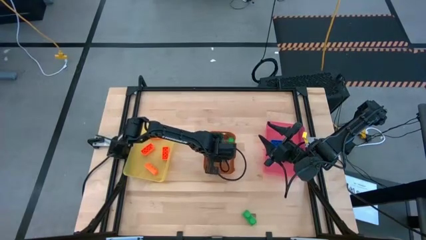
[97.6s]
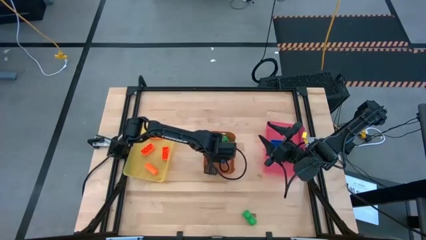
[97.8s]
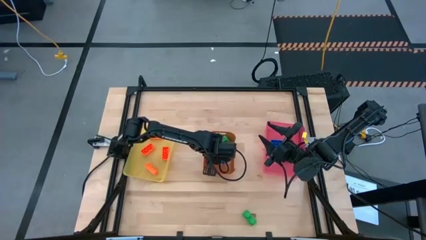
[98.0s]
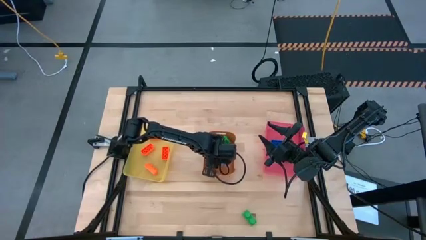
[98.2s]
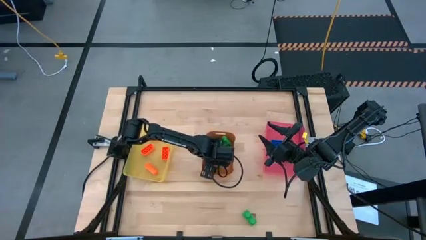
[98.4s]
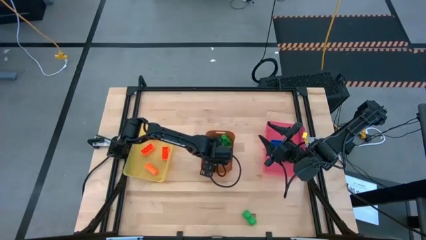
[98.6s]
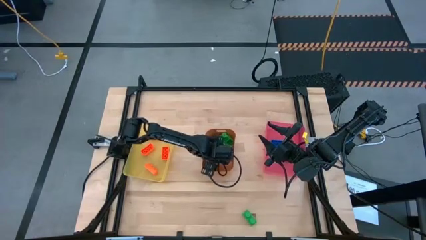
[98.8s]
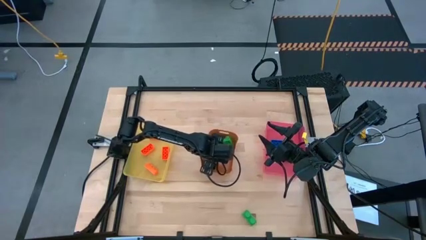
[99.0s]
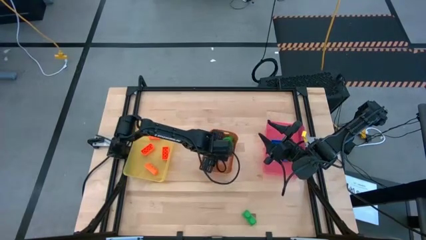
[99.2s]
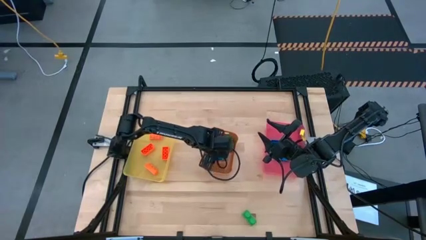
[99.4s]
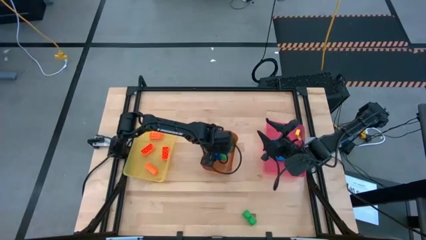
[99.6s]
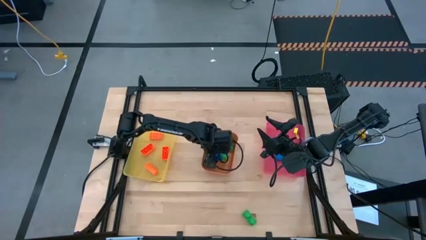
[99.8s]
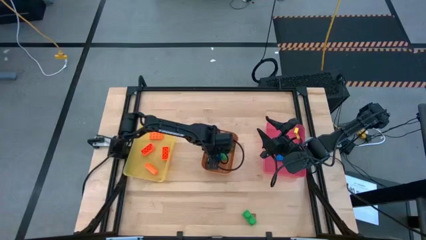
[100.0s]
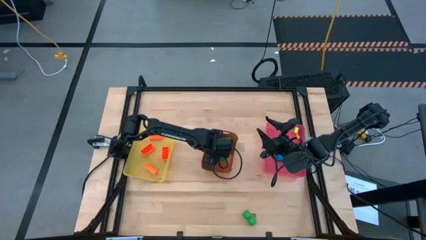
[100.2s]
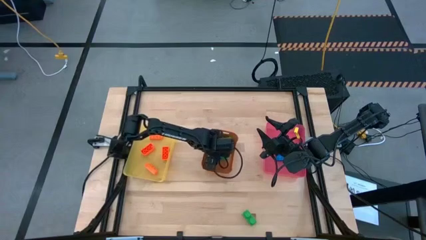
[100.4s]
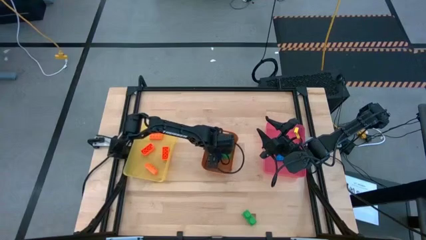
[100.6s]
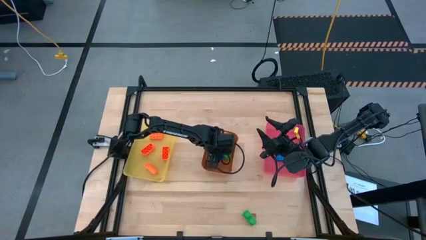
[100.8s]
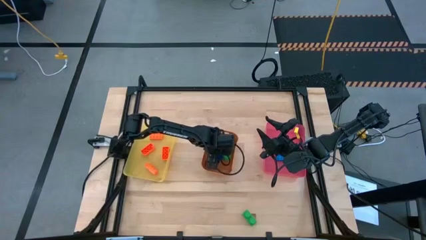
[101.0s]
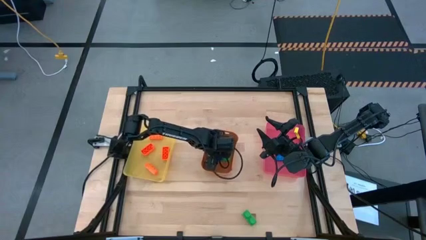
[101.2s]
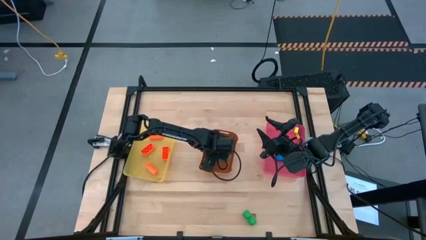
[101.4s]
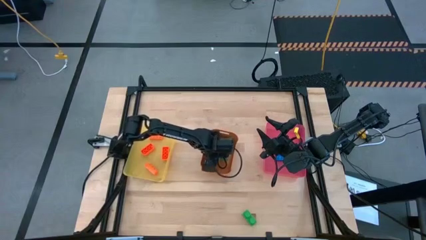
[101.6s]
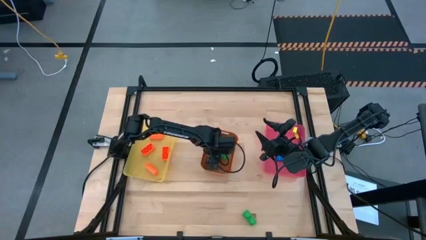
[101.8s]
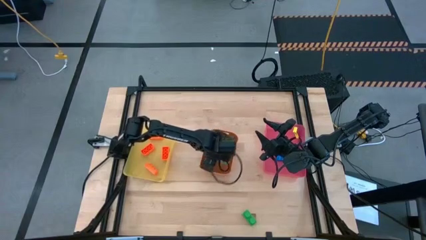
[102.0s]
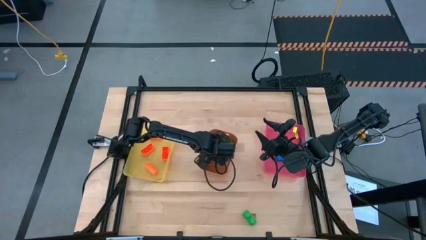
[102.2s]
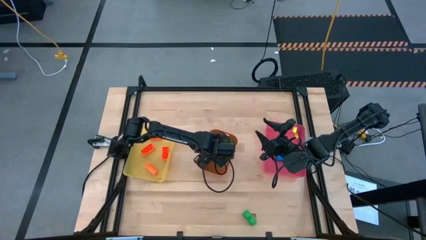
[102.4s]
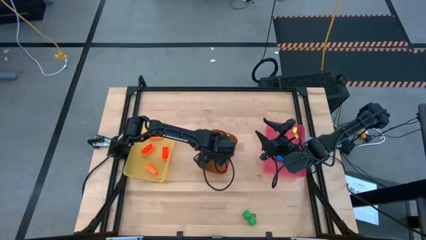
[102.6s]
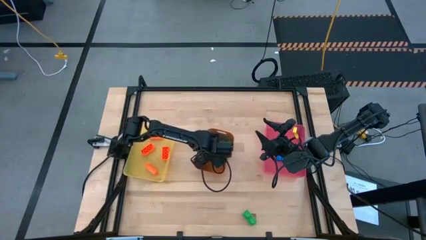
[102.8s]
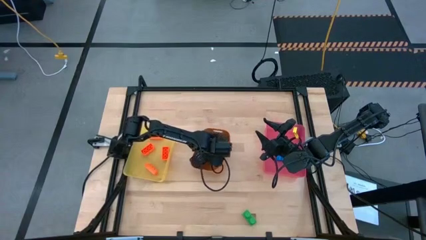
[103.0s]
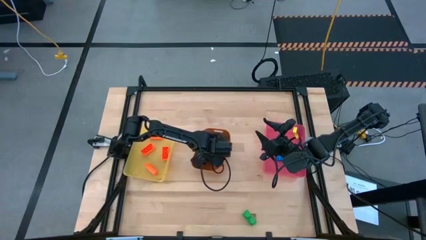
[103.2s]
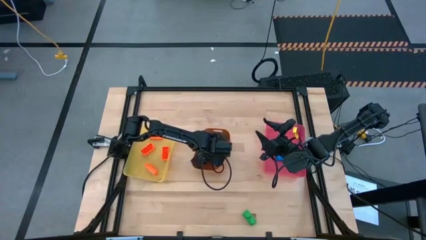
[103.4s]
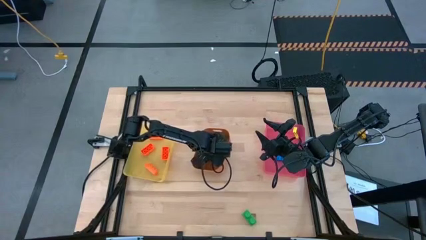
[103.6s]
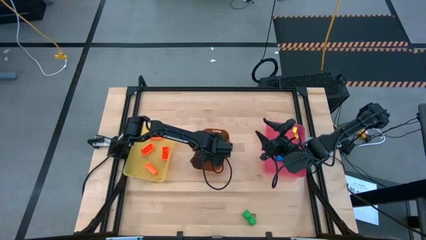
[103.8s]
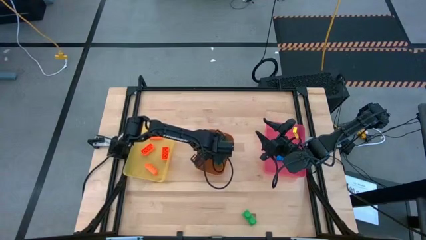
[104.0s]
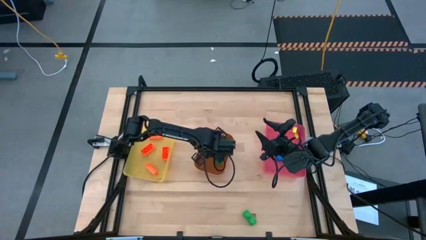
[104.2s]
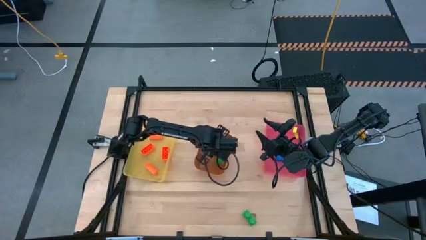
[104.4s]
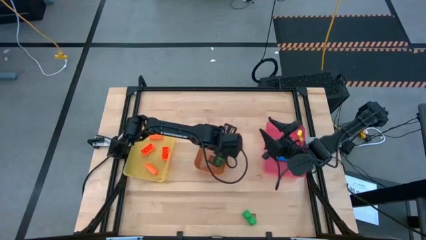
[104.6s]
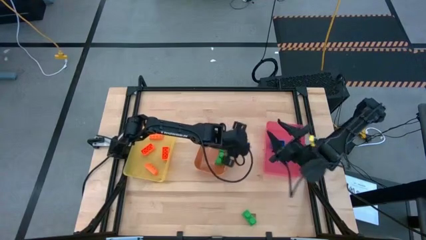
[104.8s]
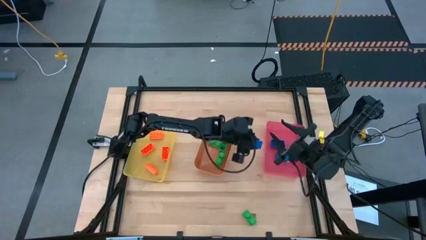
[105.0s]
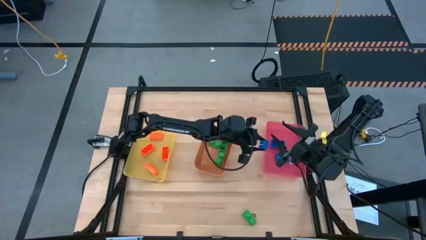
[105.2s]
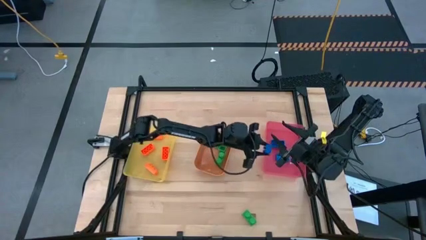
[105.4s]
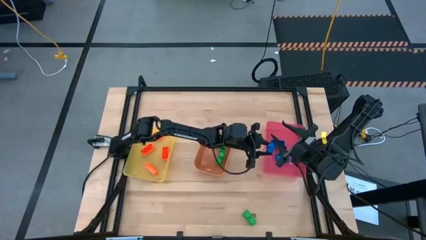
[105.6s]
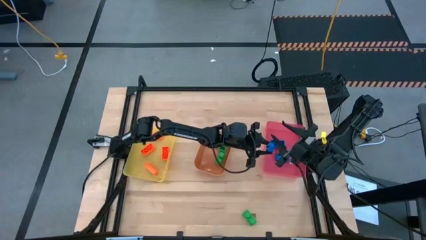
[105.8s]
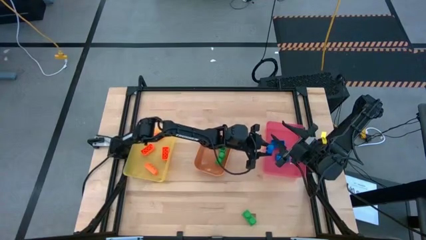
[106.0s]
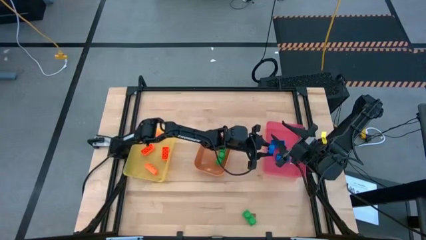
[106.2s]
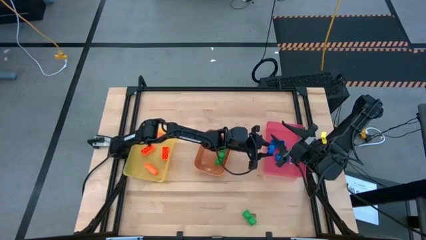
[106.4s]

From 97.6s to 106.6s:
Task: Sort & place blocks by color
Put he blue game piece into the pink bin

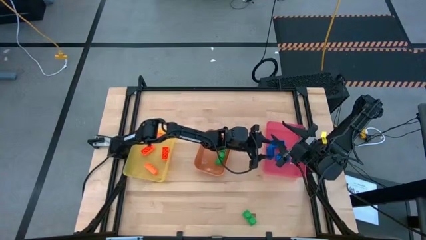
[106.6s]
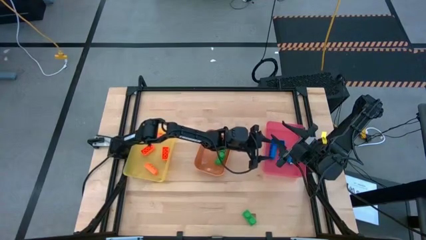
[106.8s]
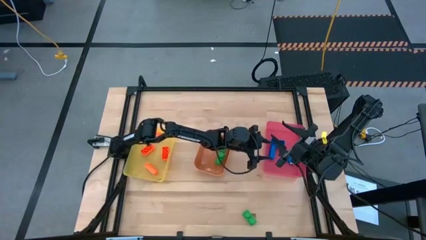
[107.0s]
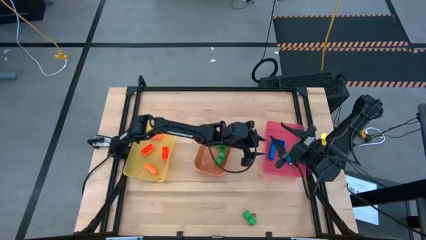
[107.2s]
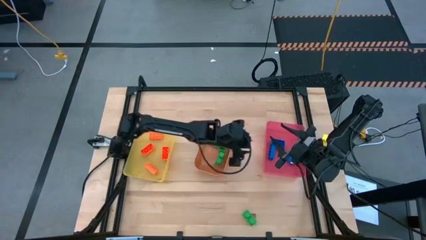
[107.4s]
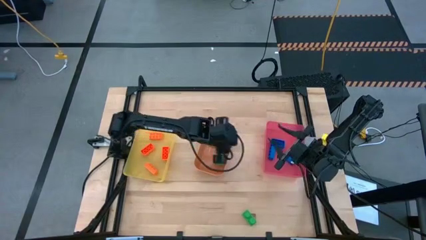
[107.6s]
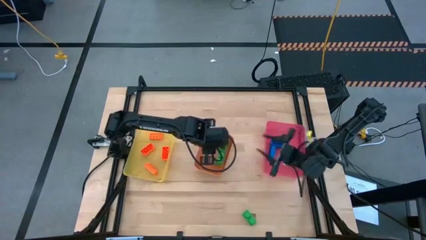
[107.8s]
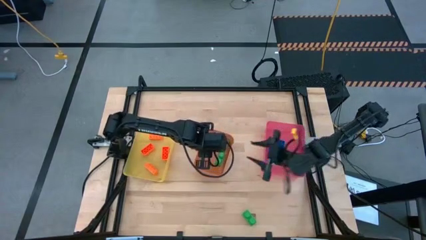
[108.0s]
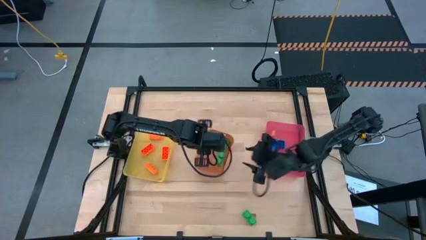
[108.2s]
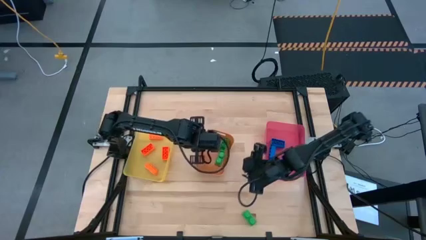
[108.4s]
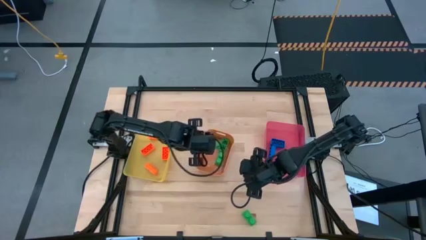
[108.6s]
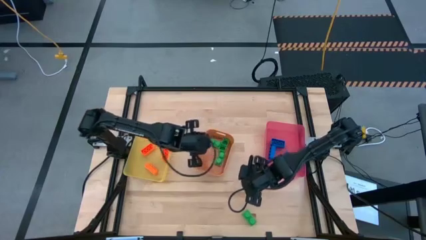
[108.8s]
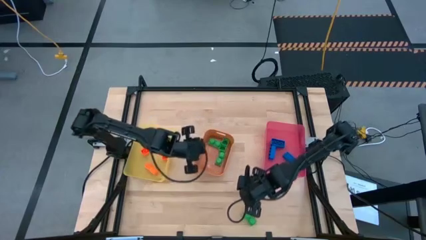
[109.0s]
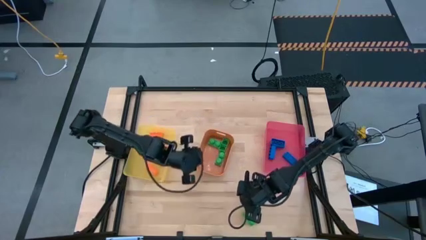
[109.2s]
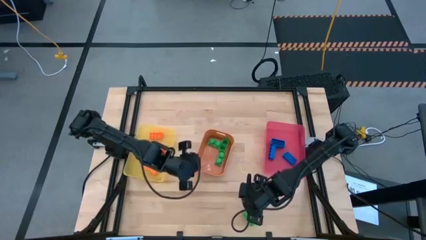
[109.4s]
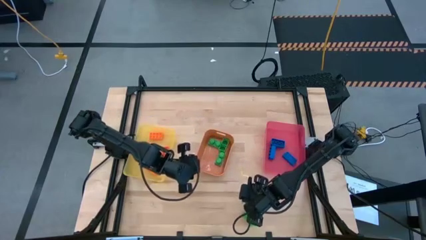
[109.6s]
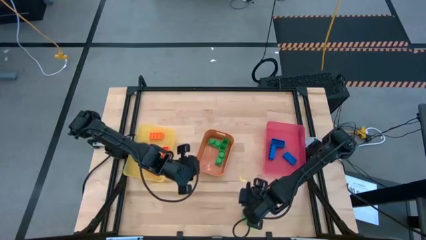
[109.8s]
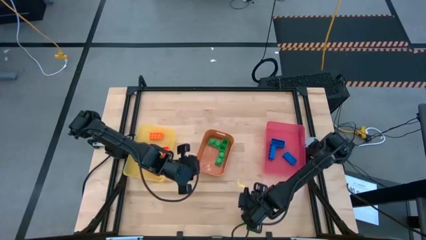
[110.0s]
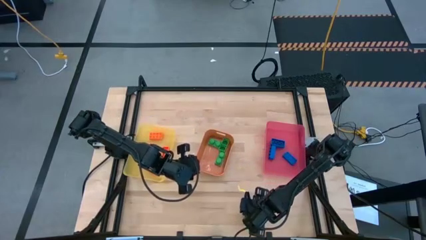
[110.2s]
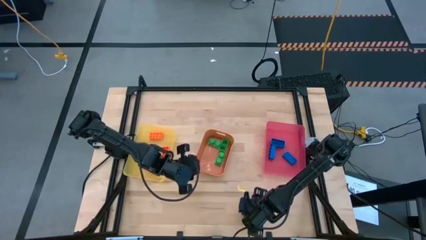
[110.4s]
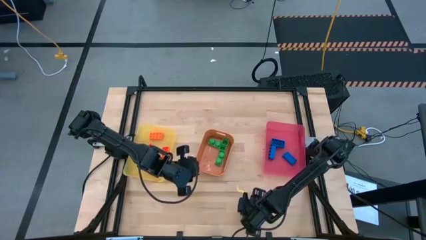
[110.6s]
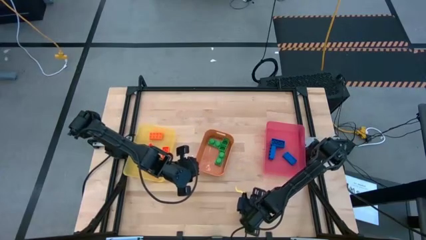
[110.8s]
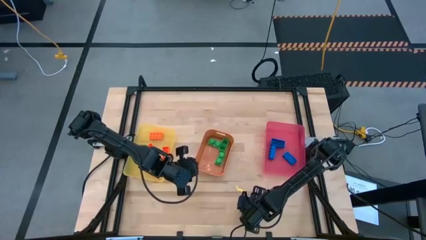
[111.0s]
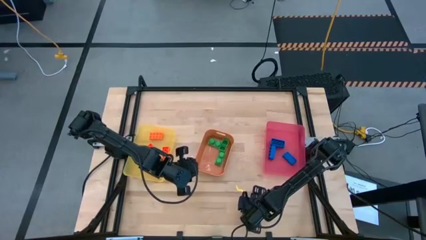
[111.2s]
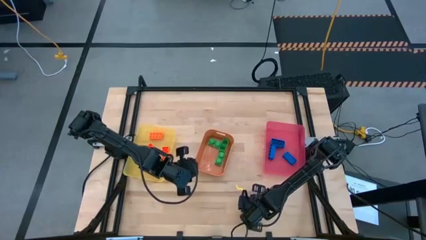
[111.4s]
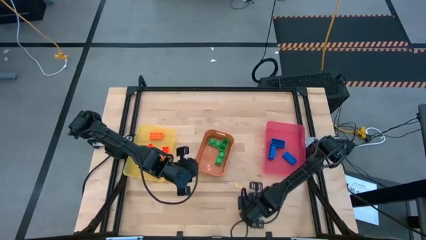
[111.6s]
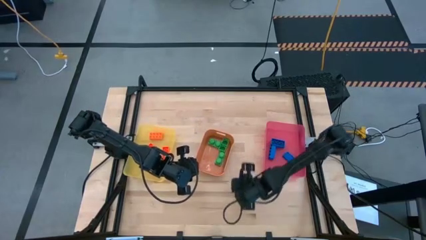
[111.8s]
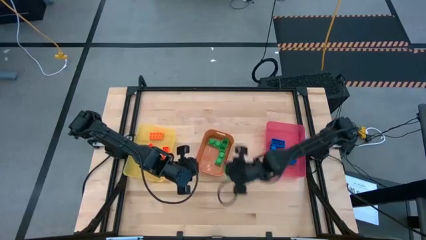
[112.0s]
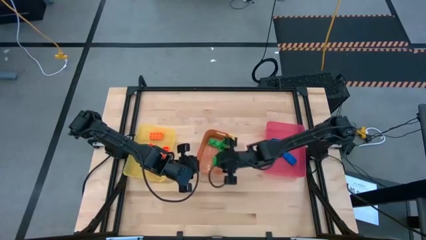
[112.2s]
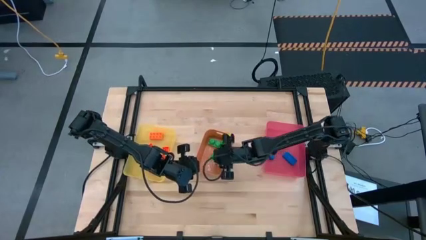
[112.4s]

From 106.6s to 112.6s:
Put the green game piece into the orange bin
